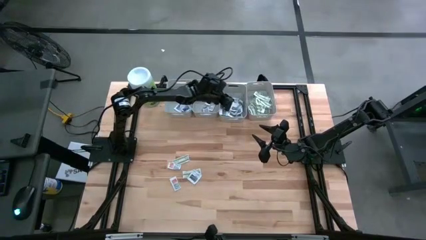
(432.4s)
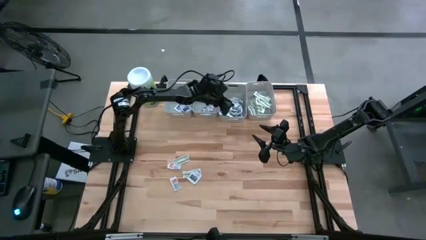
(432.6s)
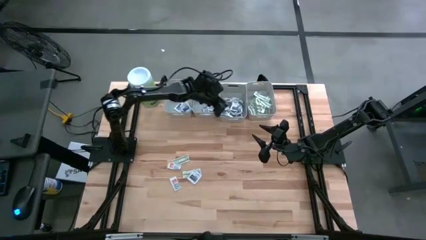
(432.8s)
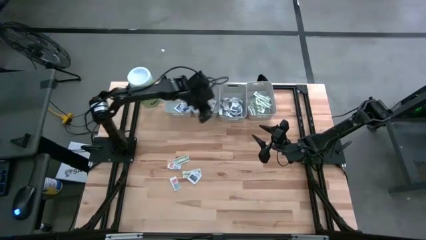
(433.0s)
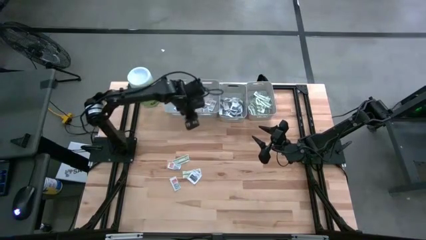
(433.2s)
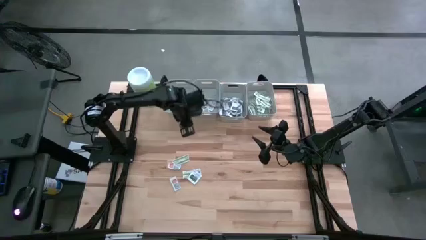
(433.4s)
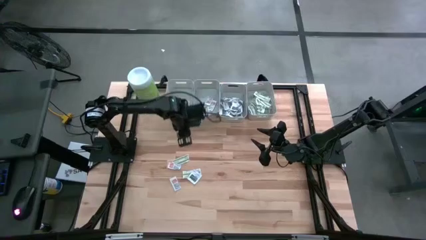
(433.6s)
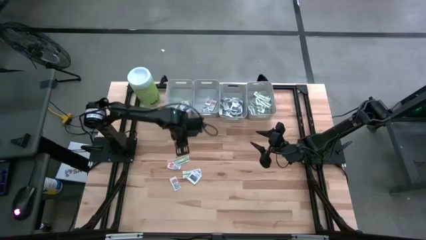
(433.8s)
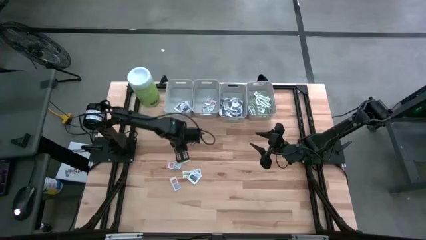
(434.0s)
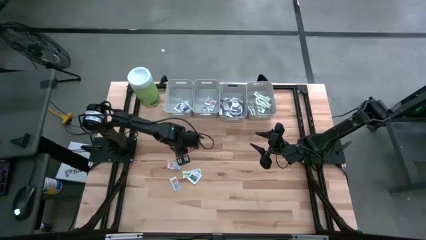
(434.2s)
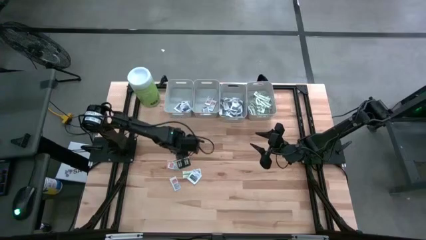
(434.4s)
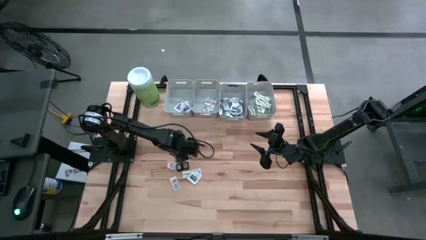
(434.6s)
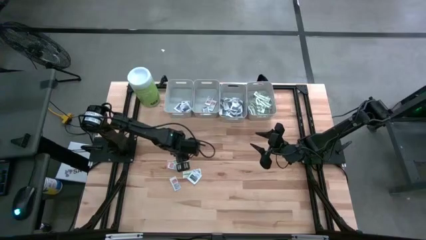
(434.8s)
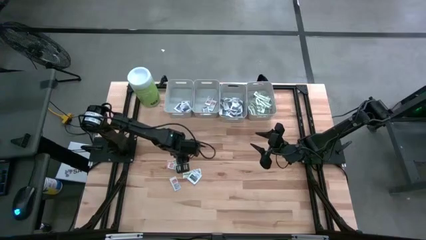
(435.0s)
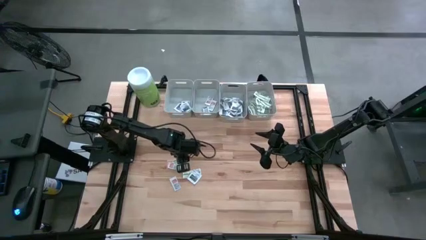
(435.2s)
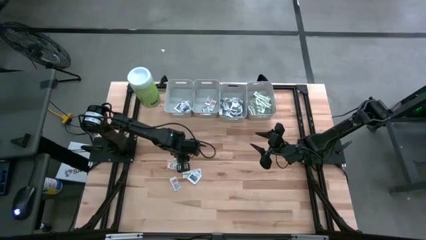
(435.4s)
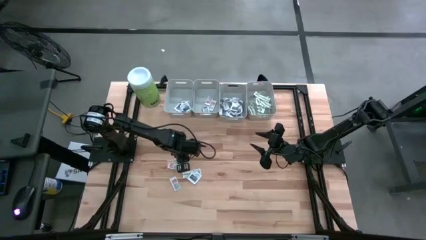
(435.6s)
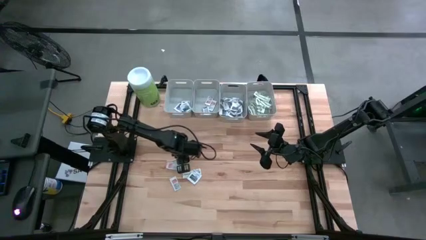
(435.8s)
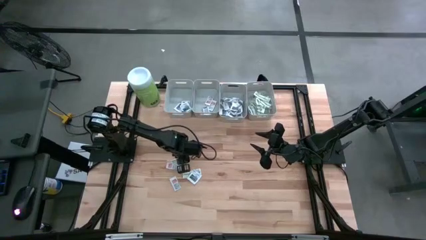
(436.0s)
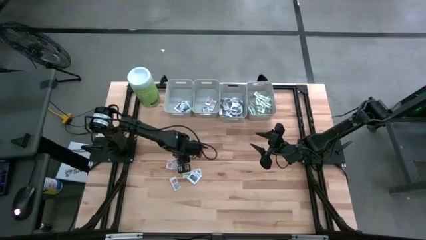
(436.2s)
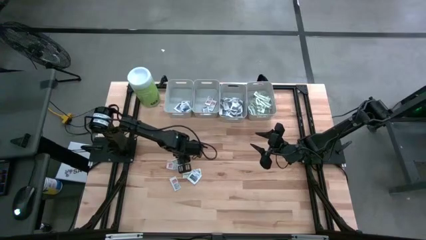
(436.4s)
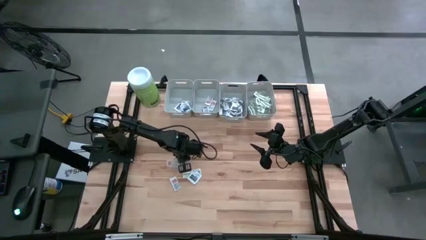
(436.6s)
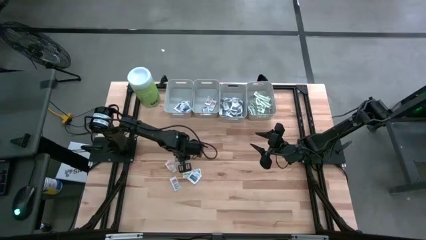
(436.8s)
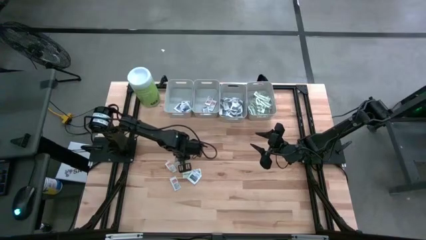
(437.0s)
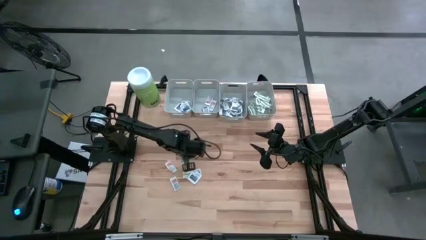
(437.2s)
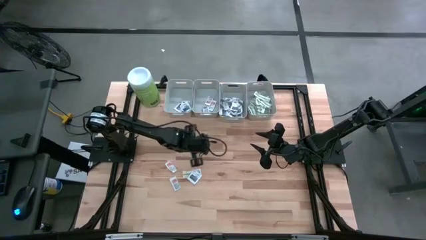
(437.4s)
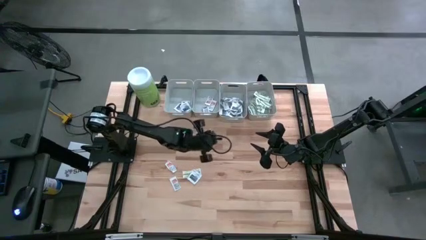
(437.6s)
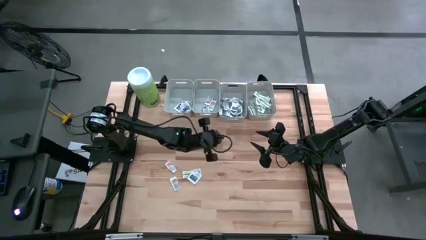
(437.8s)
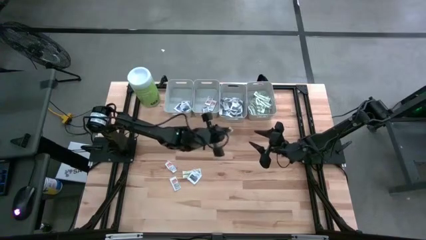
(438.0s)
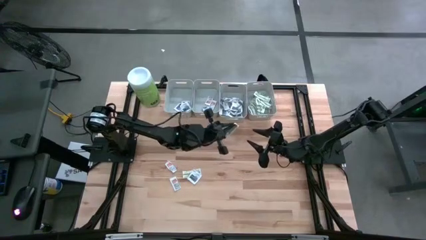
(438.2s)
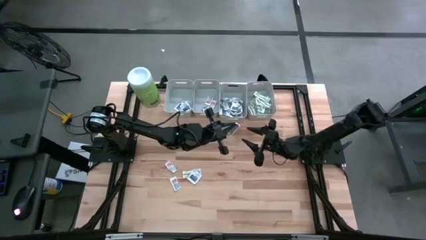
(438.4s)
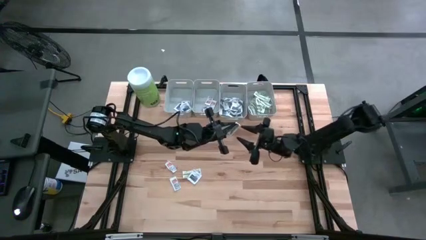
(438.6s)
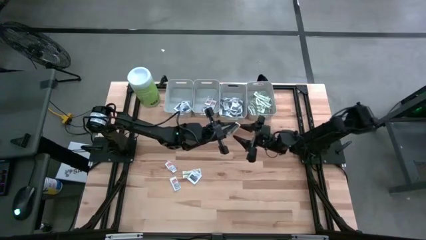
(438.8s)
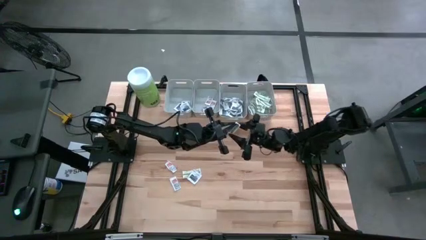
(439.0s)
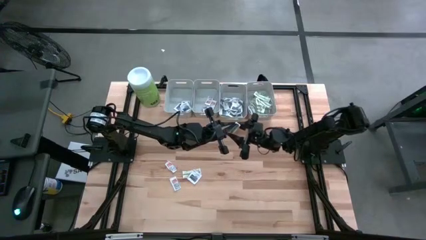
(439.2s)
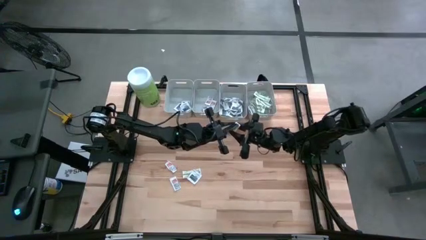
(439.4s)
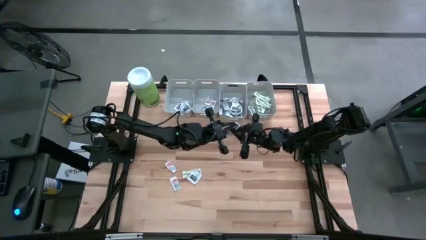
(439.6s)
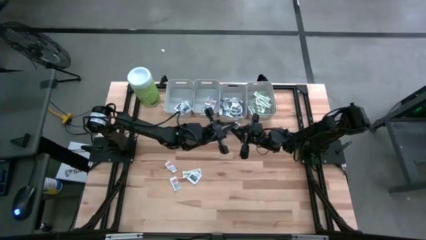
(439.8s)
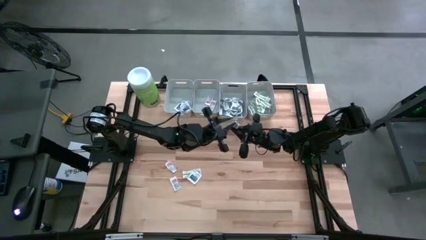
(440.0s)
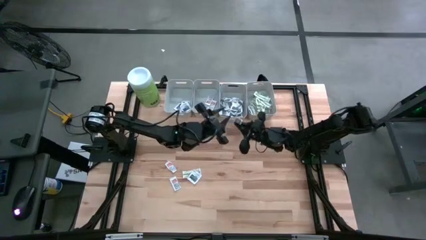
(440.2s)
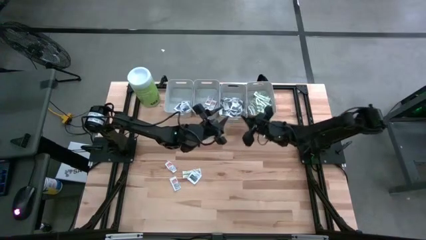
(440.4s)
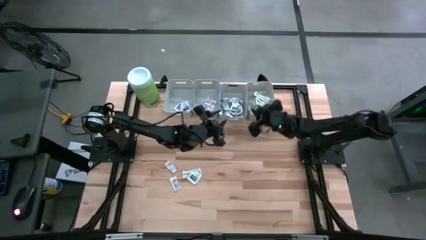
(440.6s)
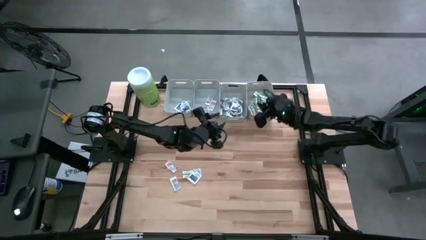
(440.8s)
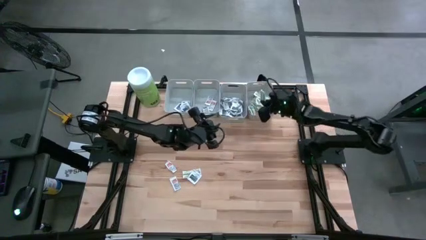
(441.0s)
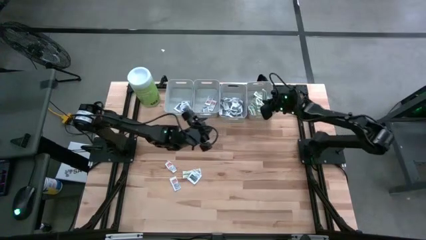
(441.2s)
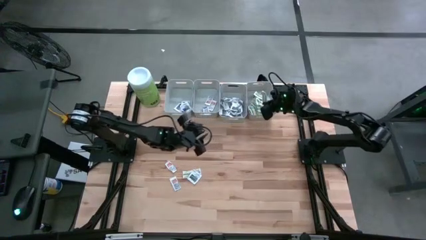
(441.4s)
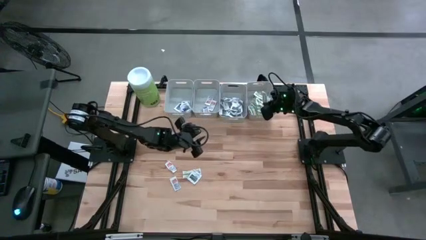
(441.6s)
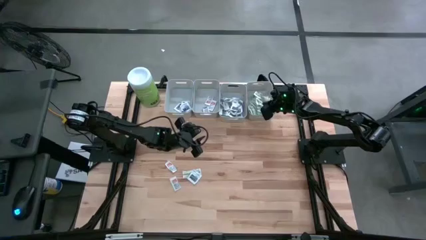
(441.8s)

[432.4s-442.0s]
Task: Pick & Place First Aid Supplies
Put the bandage into the right gray bin

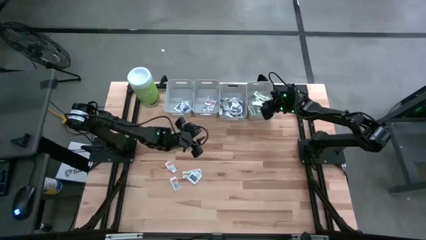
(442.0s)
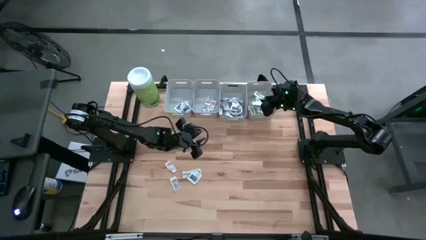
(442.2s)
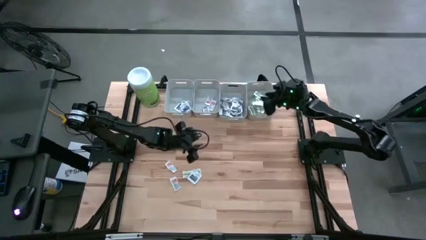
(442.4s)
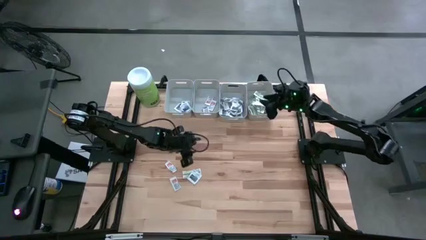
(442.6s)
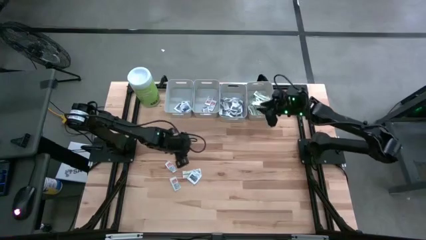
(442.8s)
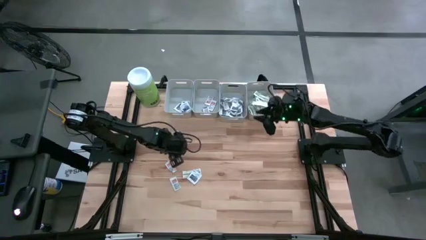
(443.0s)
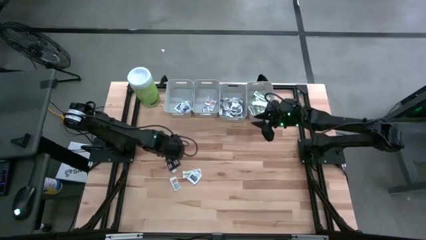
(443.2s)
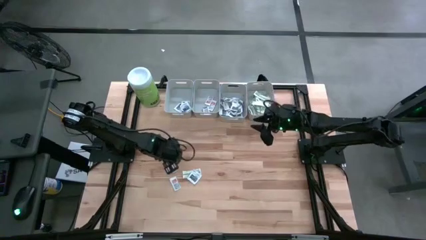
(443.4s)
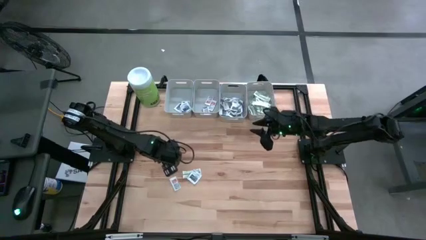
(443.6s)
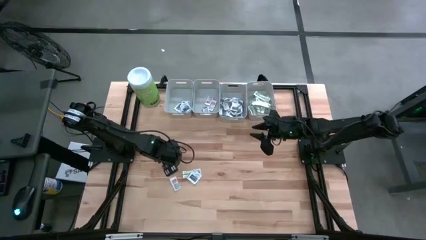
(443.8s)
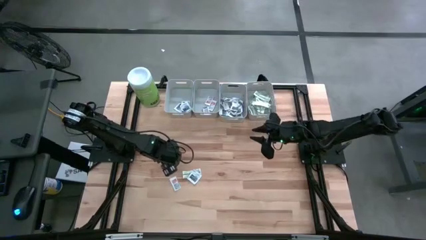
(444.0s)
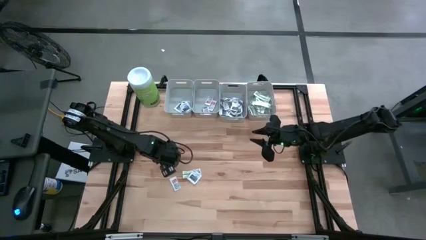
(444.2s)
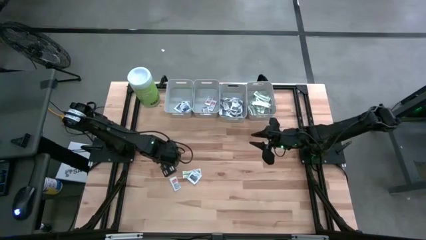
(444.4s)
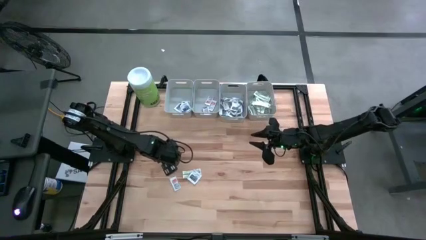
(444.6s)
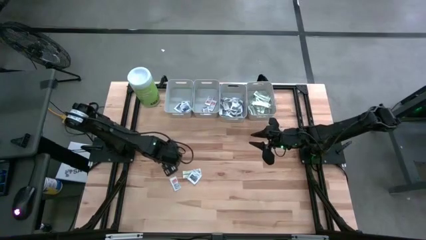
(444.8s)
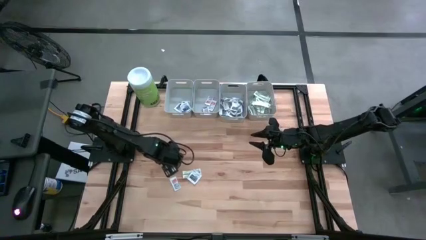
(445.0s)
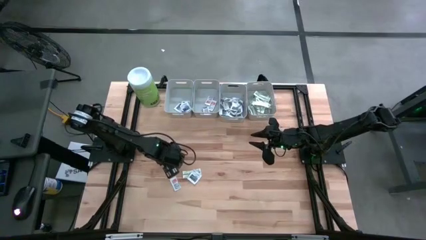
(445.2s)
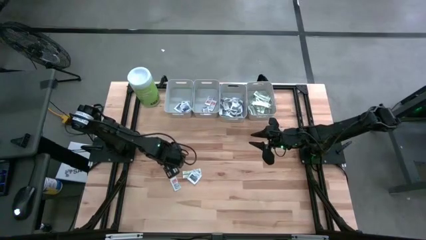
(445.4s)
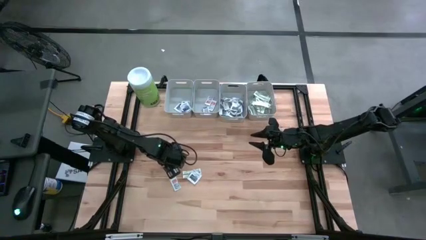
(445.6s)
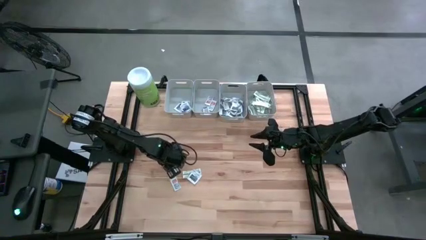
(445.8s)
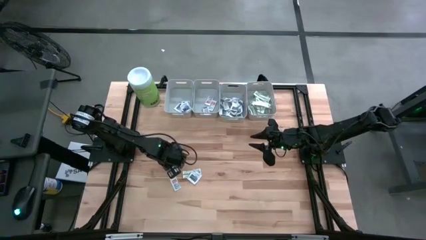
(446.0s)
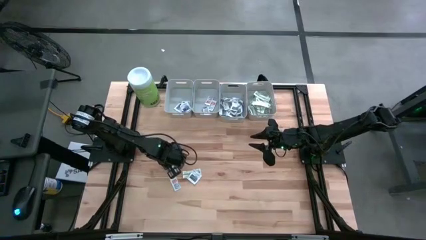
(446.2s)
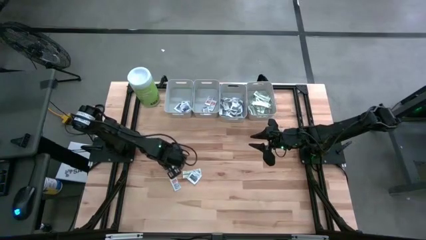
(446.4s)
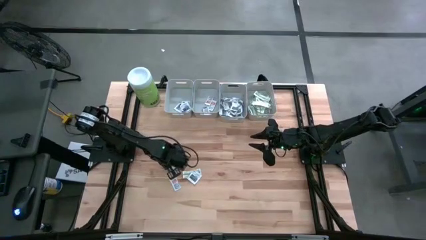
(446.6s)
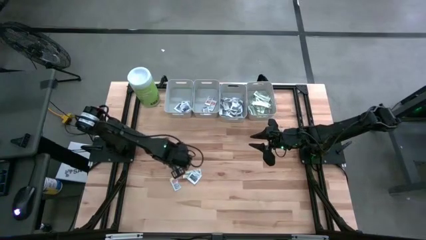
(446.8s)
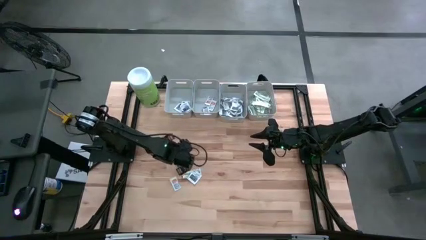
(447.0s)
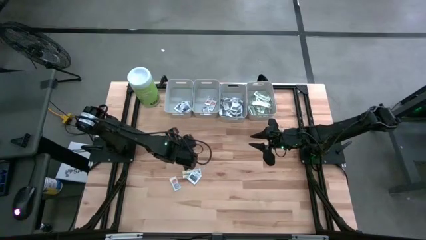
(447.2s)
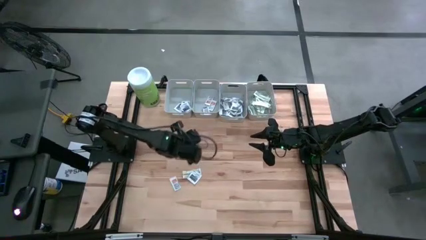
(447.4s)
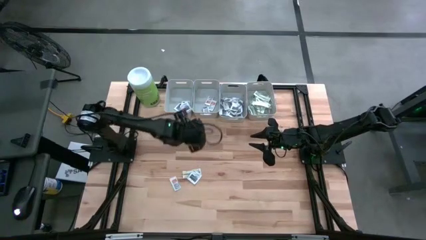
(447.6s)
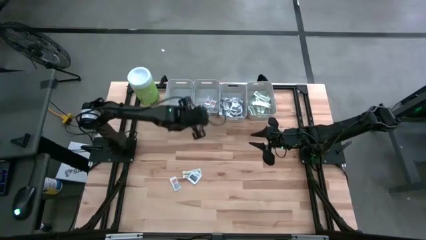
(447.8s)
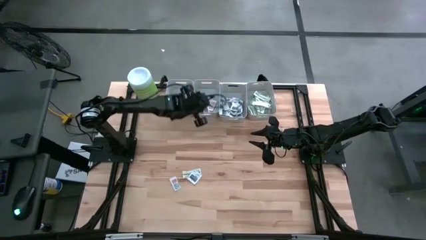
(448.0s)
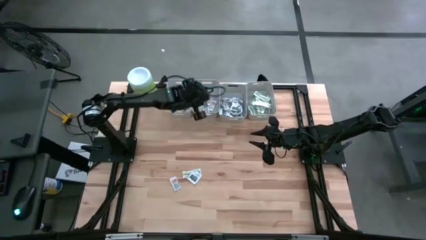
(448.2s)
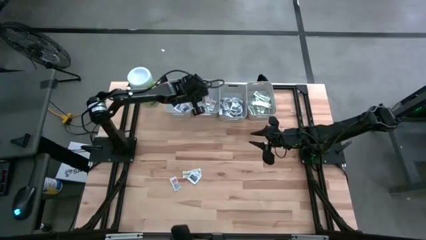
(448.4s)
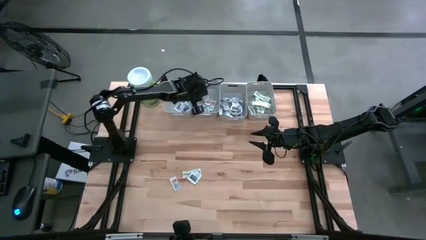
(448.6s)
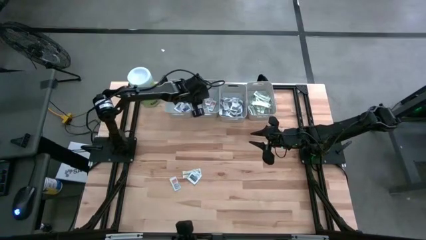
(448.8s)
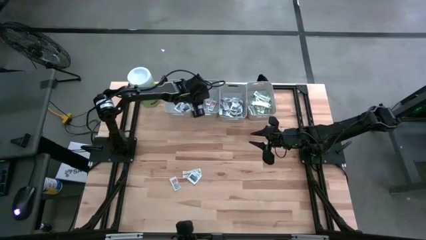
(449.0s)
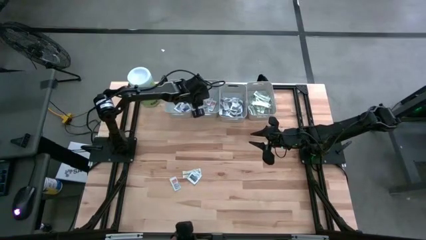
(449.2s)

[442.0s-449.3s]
Put the ointment pack into the middle left gray bin
